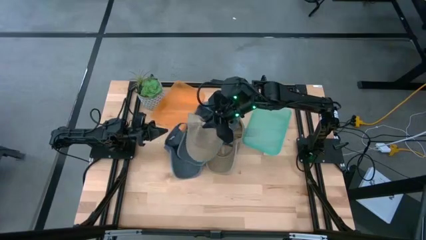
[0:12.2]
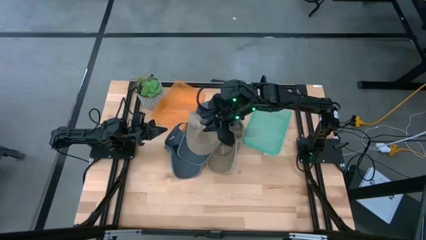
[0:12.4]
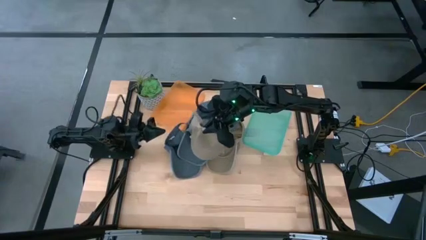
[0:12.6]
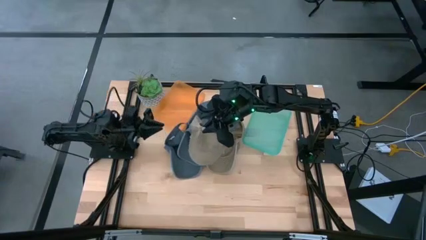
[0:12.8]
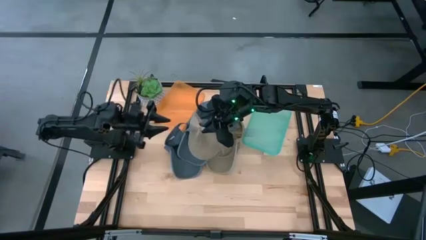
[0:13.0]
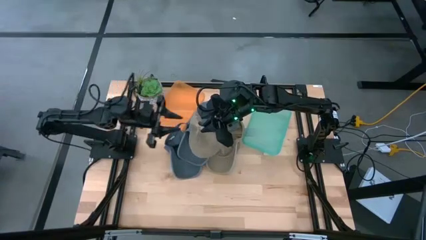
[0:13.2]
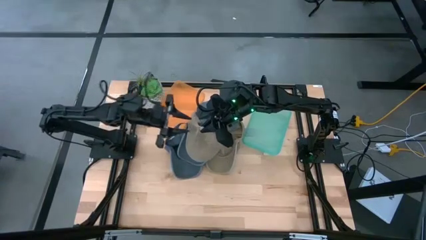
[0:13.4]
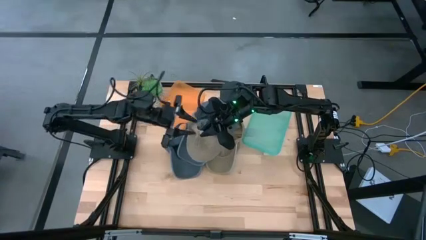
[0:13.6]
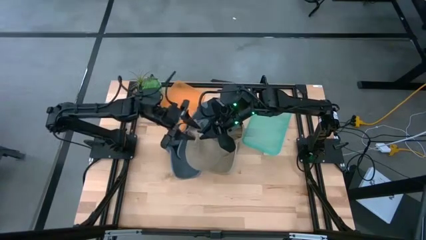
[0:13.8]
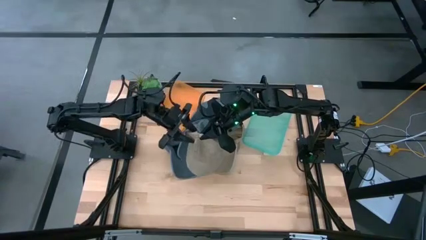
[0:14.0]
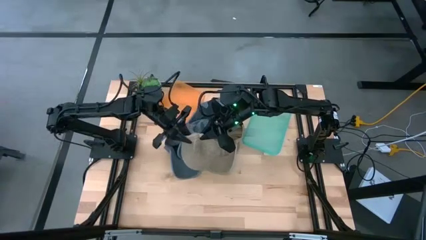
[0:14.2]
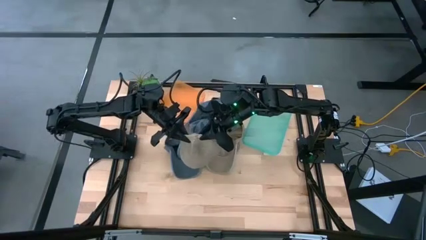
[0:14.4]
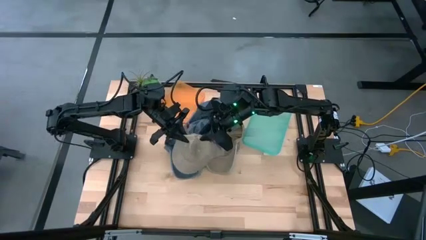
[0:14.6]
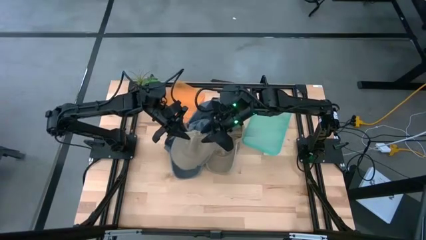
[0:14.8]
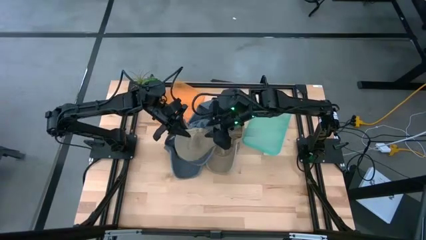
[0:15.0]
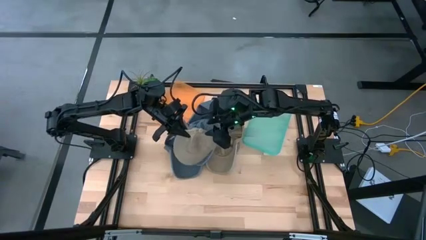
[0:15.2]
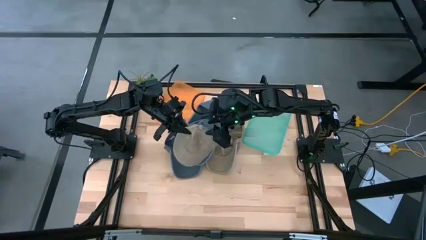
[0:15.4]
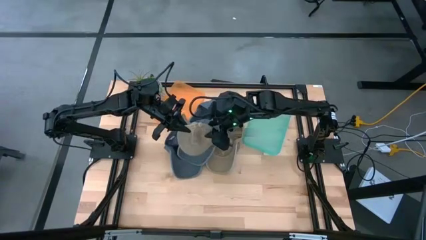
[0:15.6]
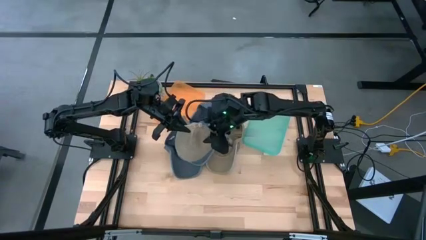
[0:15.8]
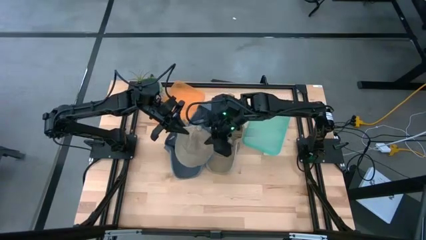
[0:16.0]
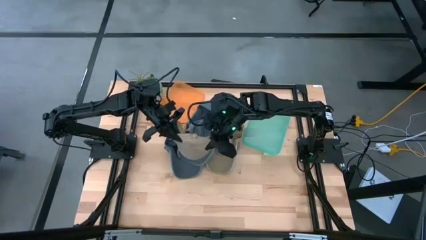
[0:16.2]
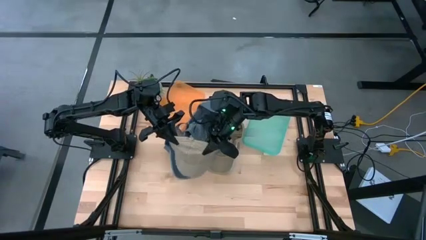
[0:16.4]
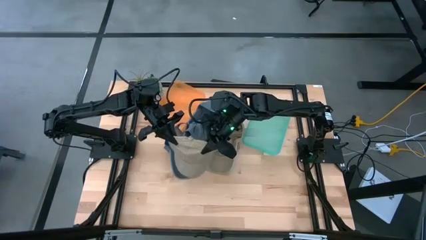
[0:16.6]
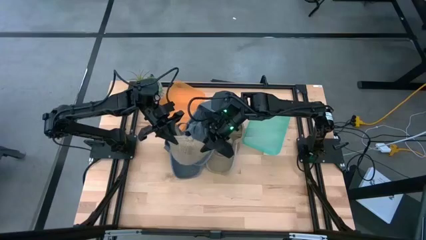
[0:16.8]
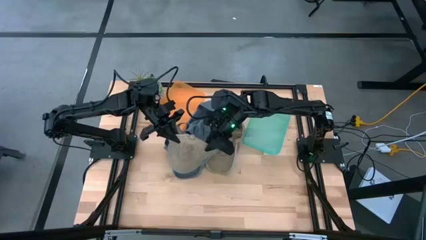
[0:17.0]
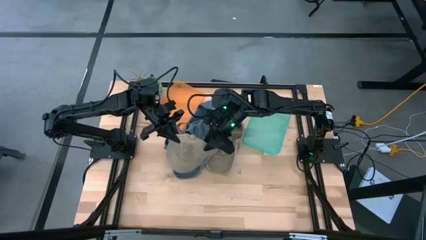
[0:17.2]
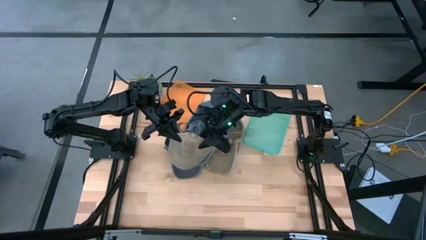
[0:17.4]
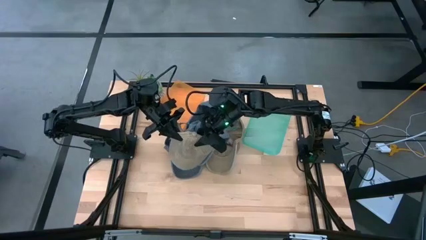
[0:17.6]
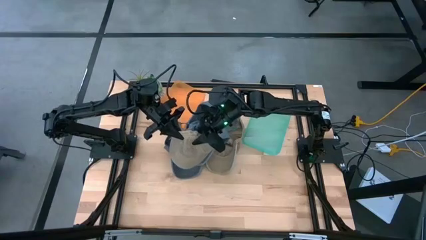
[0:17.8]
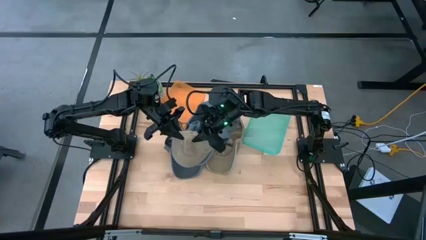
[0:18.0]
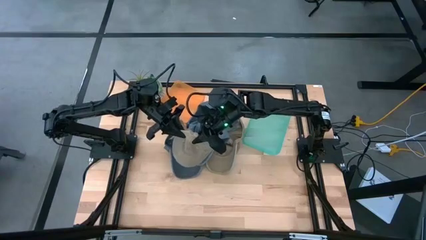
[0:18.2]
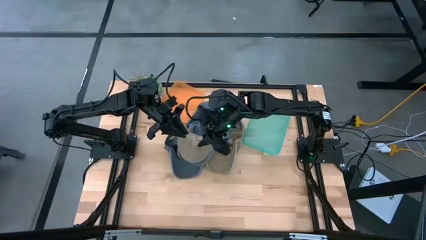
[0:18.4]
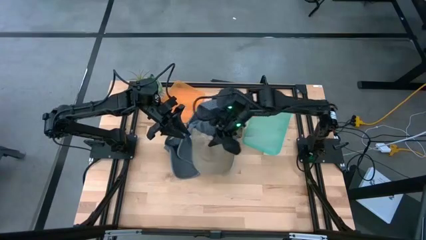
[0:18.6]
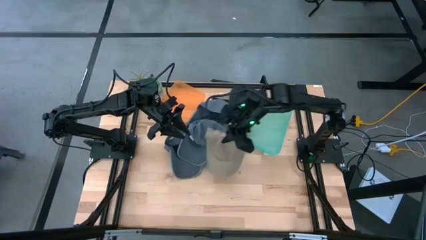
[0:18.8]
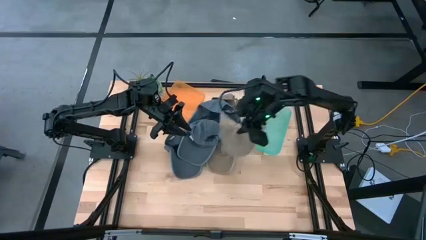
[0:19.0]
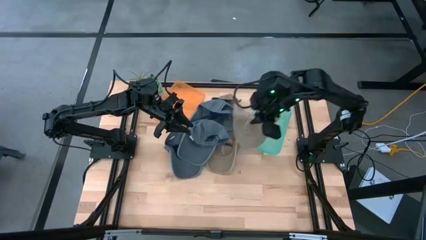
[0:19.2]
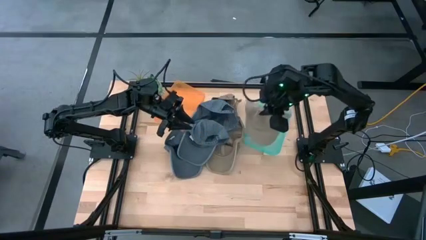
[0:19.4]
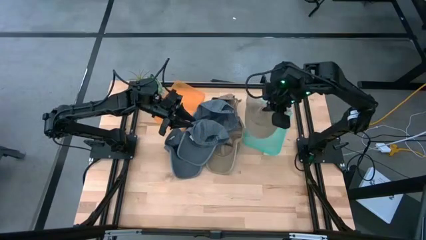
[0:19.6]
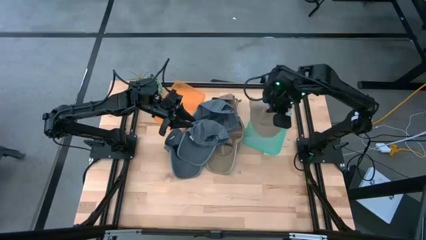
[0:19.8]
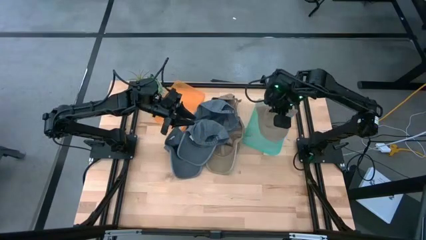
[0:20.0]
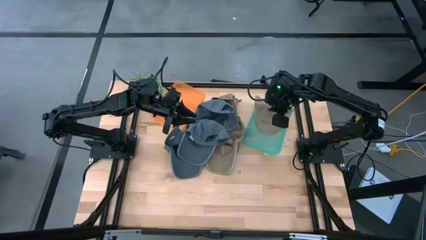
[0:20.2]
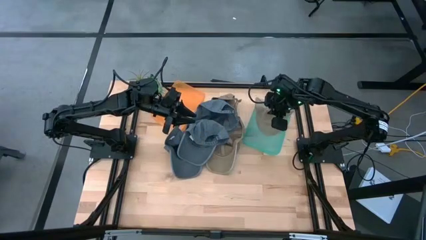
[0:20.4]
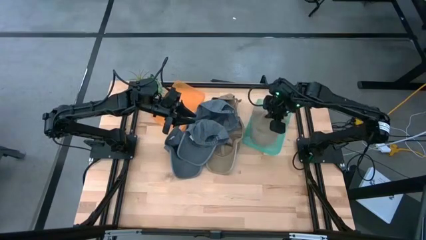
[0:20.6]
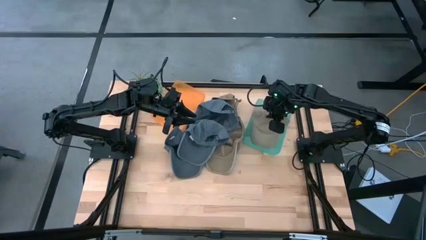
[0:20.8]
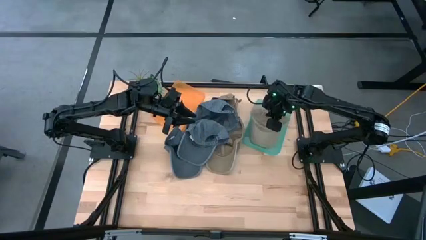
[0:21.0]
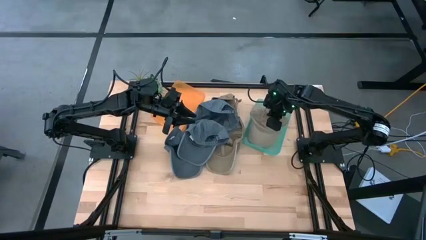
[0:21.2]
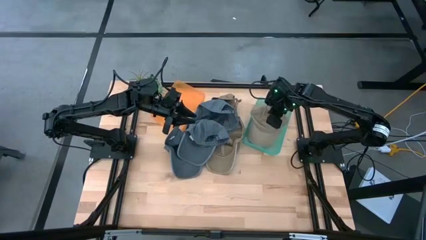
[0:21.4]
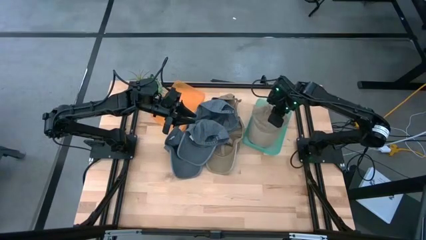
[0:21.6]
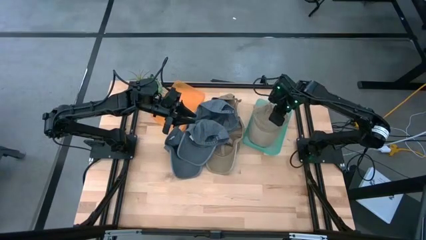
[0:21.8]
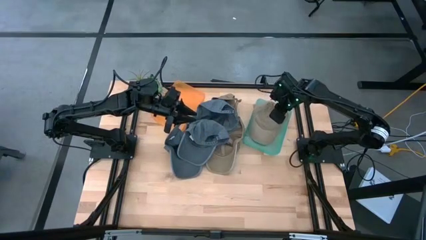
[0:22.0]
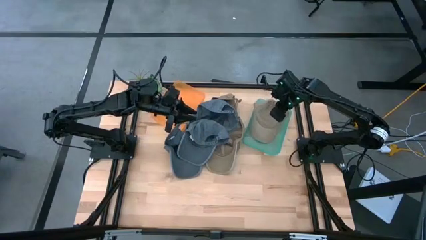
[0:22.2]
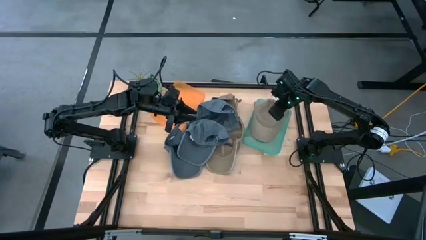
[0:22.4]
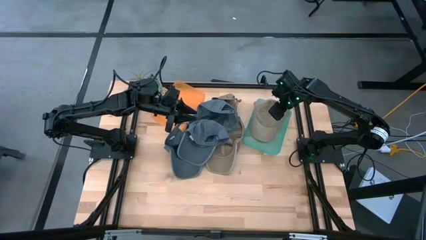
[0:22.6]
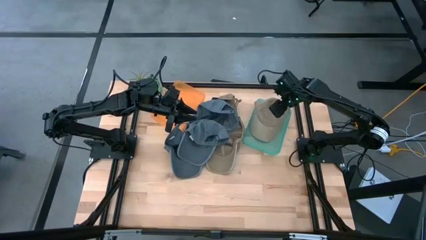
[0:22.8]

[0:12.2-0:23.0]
Task: Pick & Place hat
Put the brown cap into the blue bin

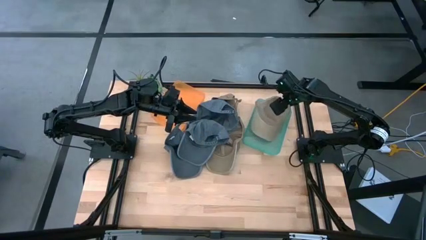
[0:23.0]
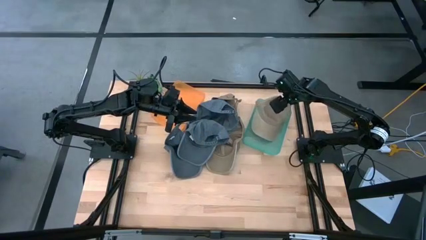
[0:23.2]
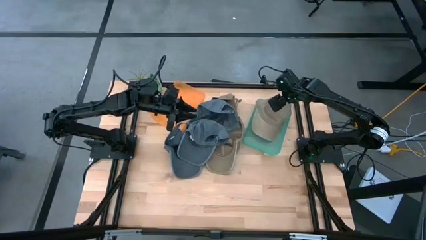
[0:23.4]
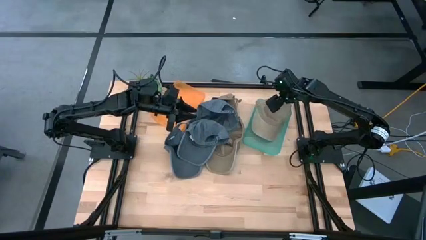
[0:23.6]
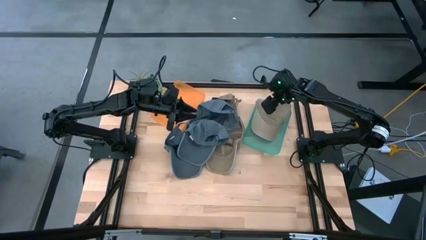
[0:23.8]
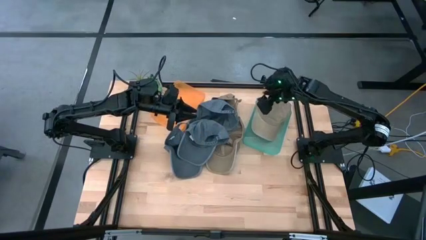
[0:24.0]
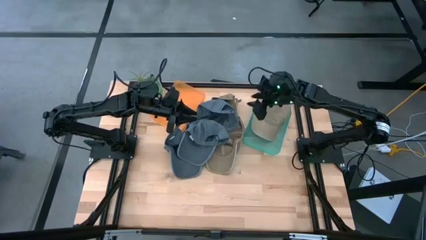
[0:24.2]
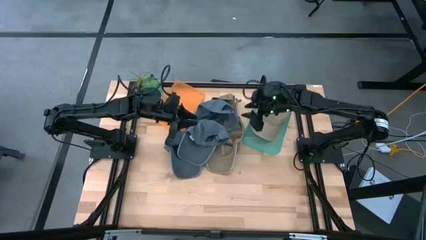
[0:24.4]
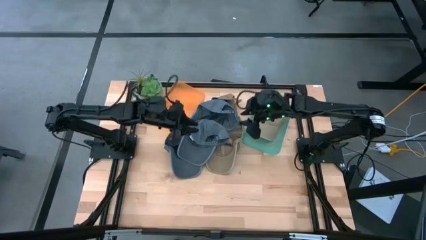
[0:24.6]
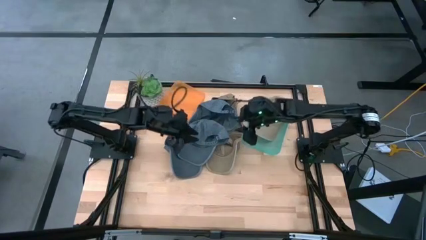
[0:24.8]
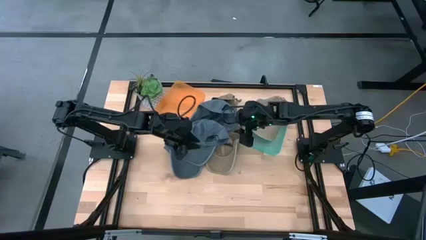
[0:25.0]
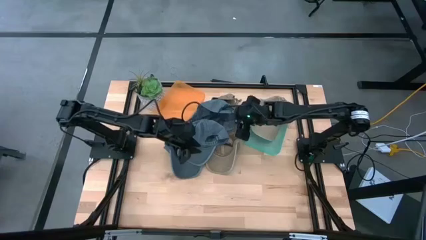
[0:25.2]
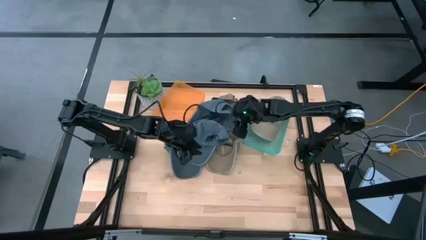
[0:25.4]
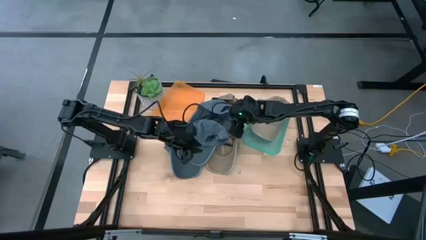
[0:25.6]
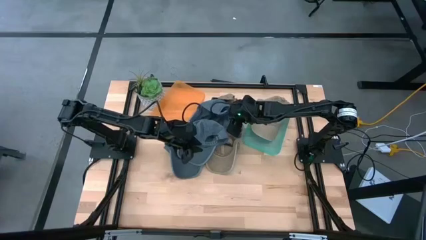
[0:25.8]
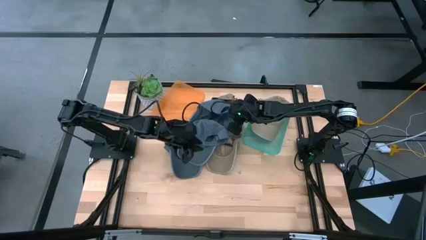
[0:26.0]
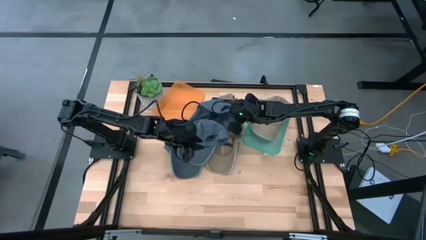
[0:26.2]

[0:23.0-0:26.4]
Put the gray cap into the orange bin

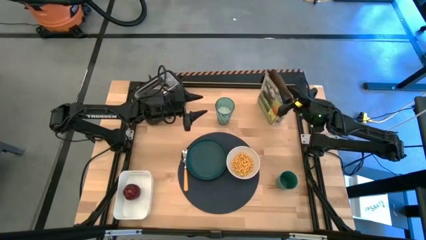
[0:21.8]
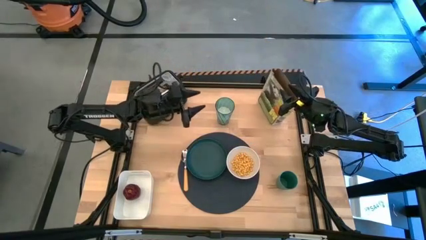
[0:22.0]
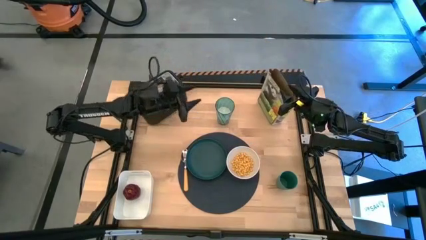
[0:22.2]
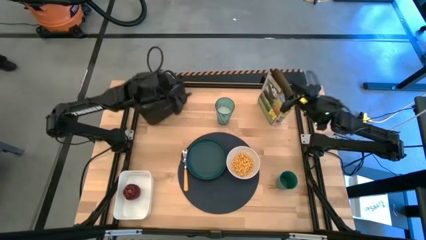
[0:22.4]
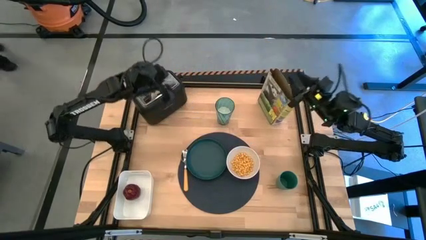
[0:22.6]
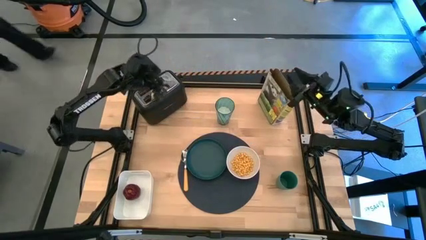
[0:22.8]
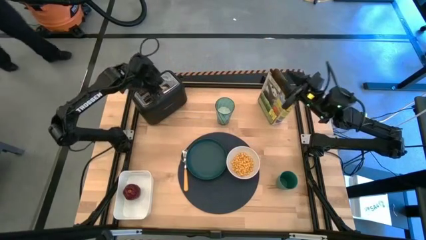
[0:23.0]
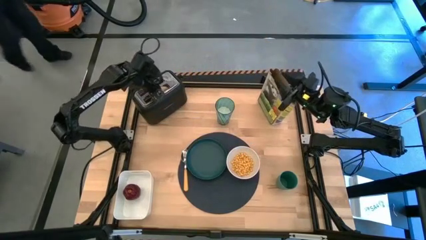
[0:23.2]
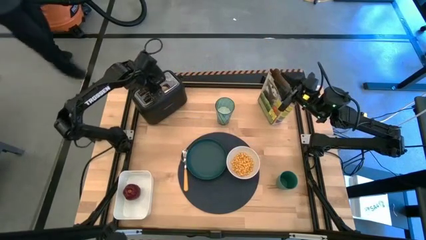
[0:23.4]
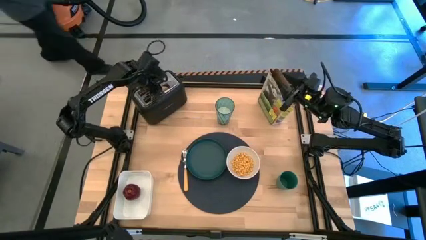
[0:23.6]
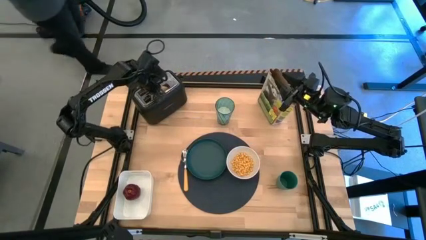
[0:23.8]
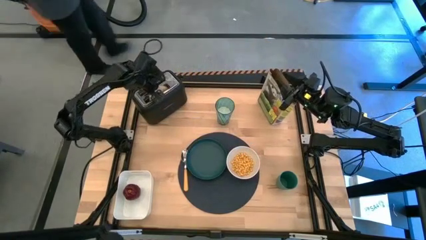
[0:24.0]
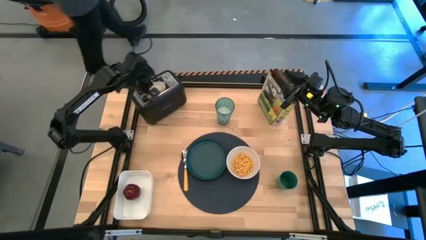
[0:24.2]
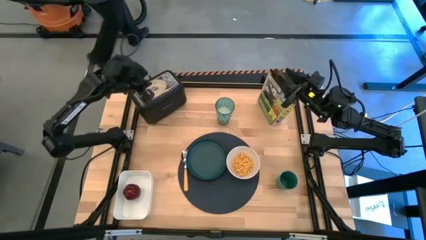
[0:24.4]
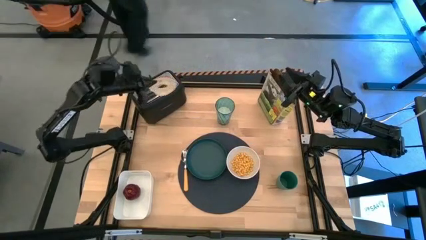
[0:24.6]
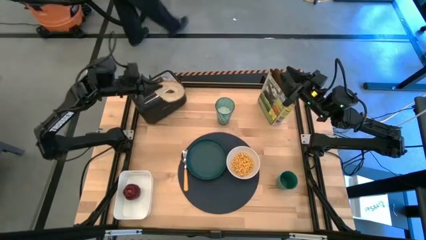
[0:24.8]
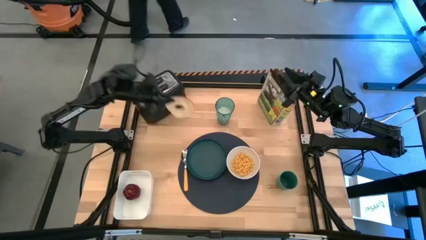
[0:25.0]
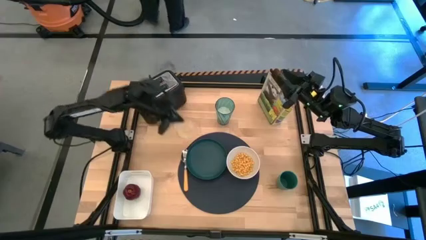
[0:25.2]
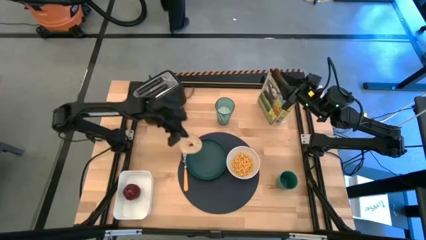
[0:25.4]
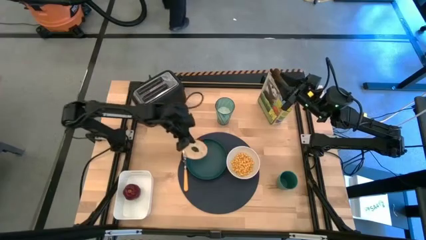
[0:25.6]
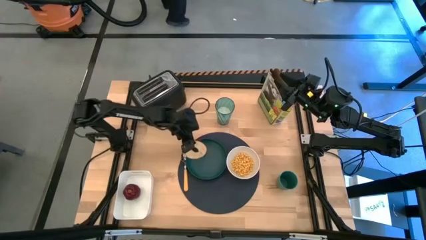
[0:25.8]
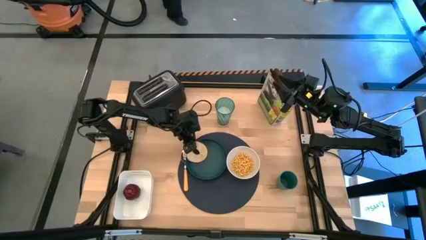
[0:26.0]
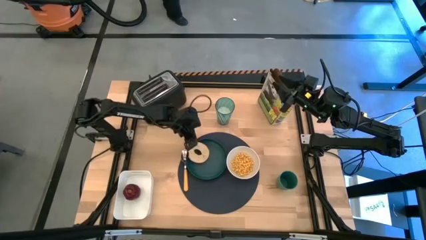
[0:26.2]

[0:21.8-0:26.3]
Task: Arrange a breakfast setting
Put the toasted bagel on the dark green plate
